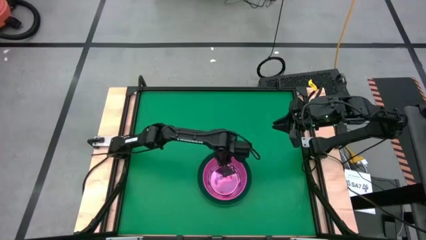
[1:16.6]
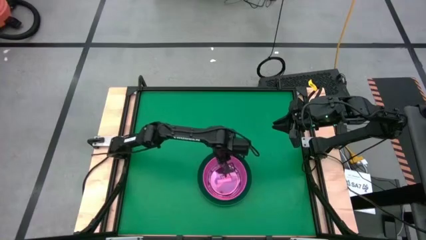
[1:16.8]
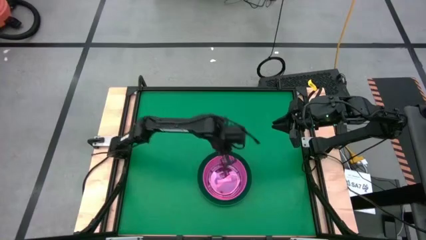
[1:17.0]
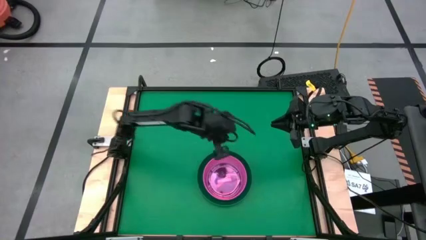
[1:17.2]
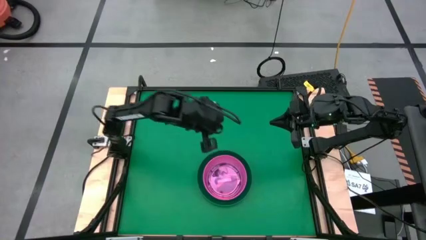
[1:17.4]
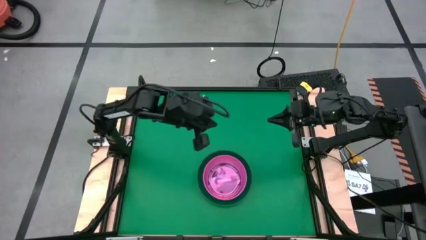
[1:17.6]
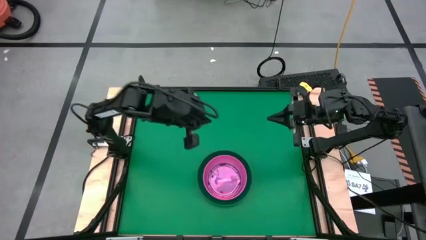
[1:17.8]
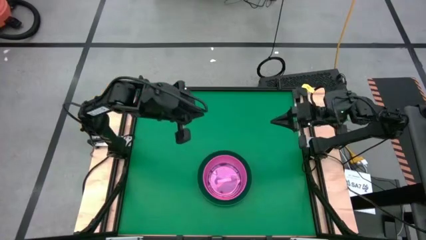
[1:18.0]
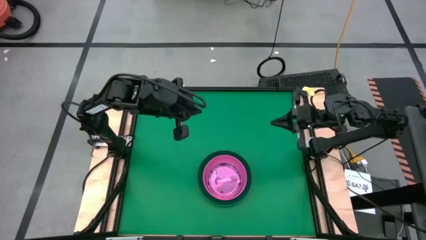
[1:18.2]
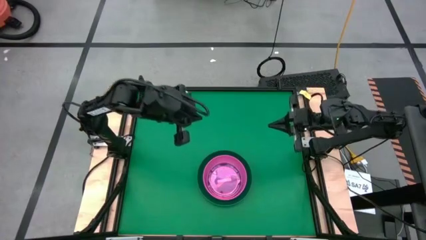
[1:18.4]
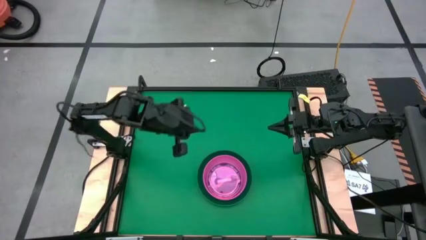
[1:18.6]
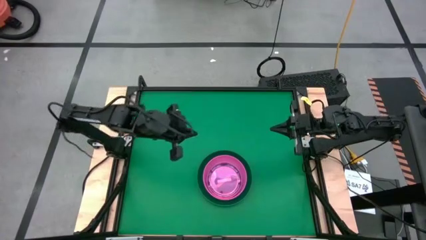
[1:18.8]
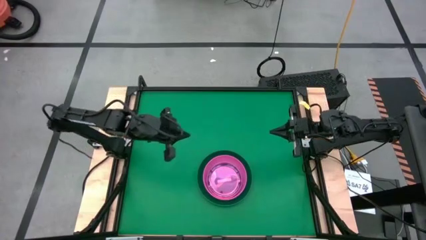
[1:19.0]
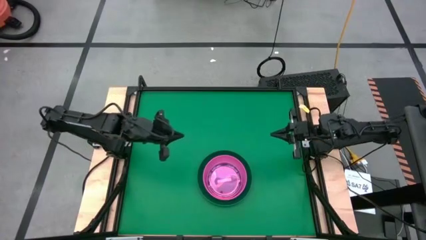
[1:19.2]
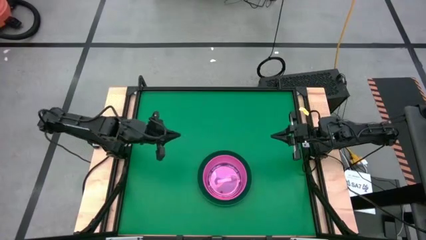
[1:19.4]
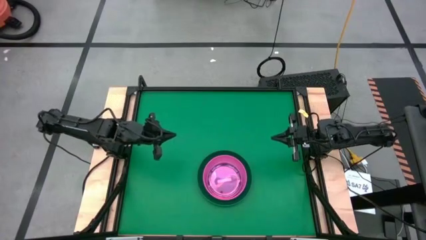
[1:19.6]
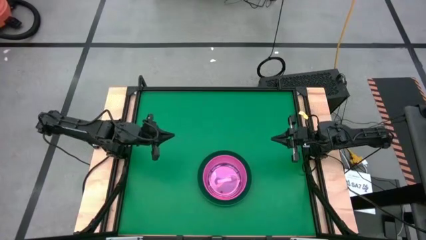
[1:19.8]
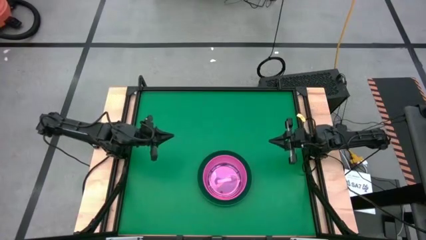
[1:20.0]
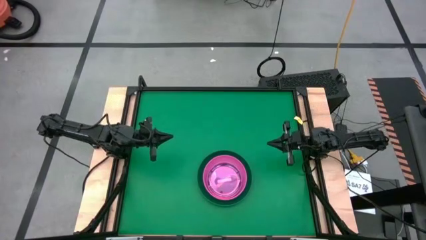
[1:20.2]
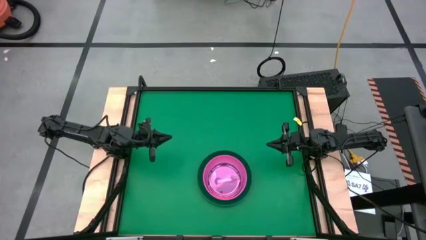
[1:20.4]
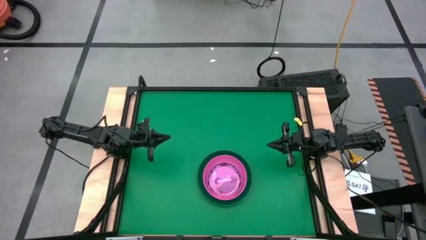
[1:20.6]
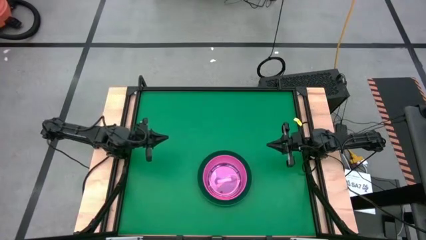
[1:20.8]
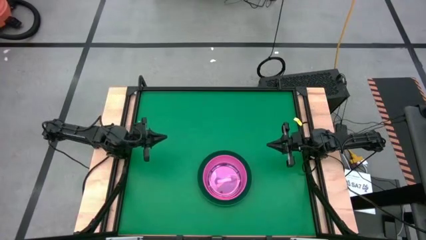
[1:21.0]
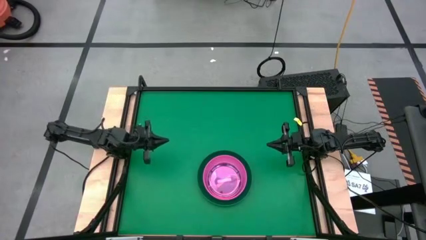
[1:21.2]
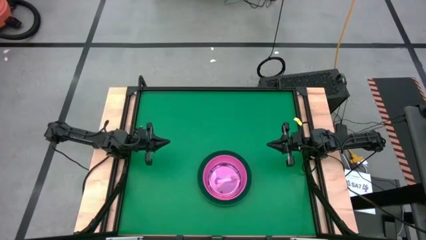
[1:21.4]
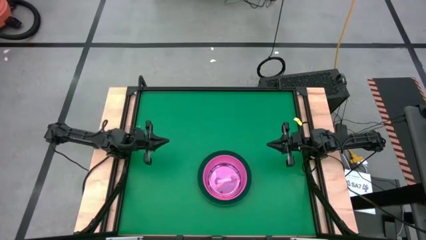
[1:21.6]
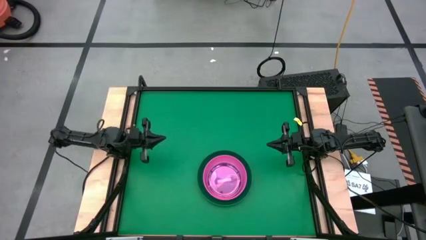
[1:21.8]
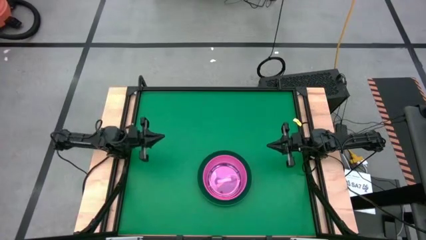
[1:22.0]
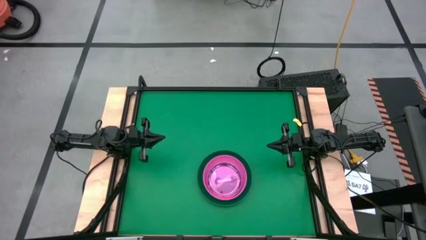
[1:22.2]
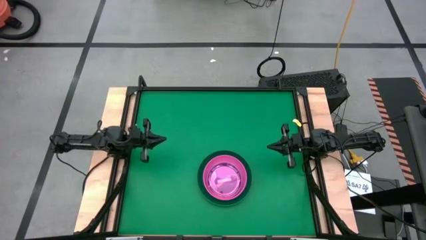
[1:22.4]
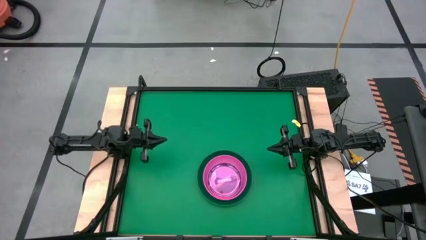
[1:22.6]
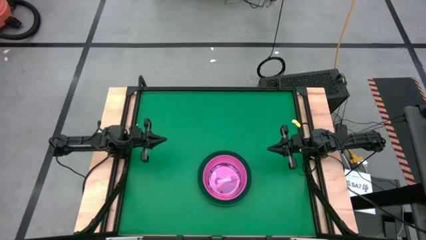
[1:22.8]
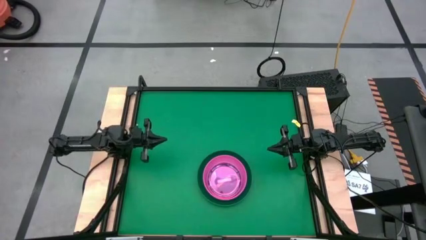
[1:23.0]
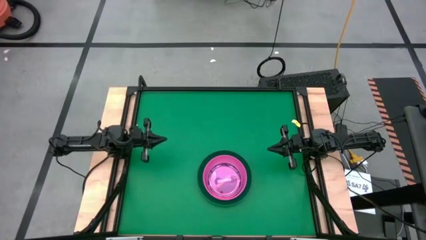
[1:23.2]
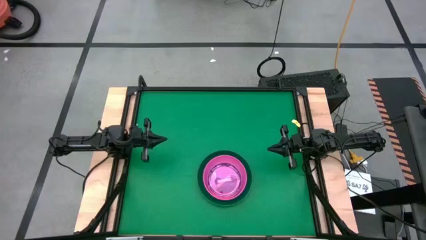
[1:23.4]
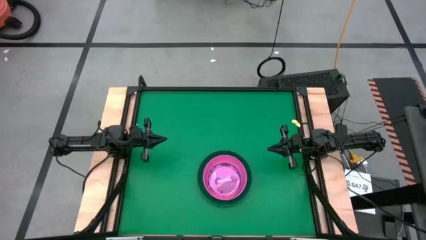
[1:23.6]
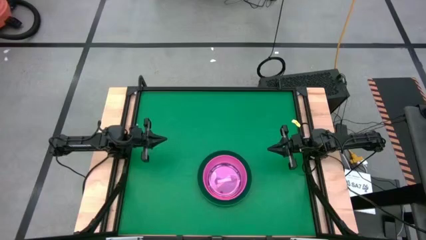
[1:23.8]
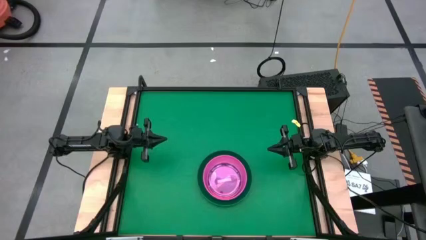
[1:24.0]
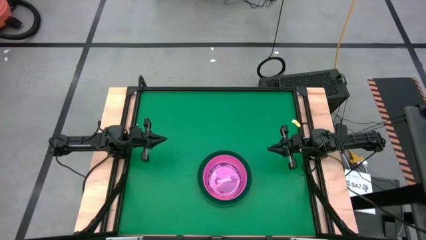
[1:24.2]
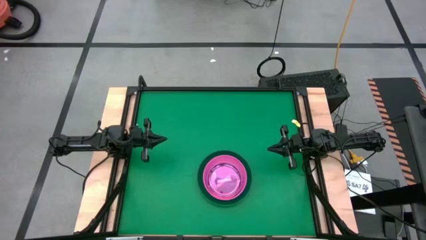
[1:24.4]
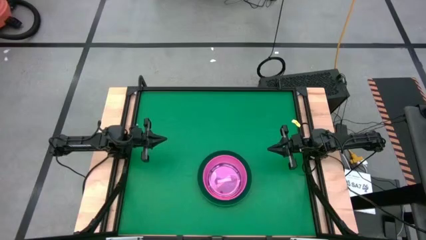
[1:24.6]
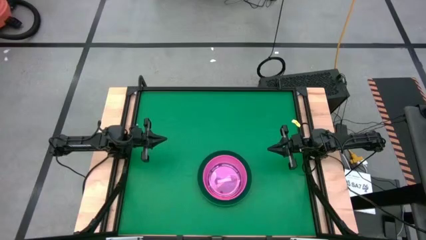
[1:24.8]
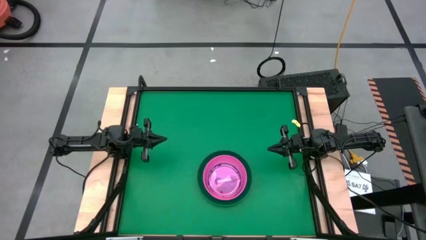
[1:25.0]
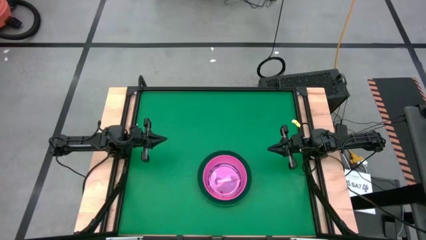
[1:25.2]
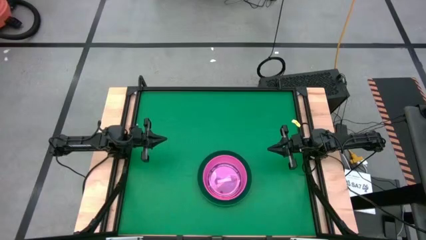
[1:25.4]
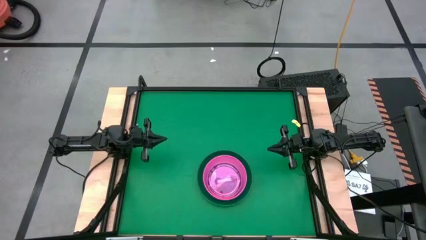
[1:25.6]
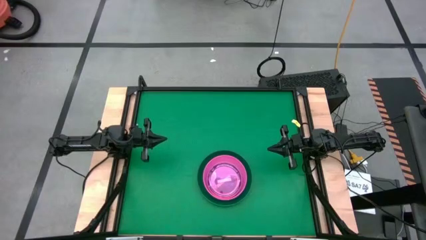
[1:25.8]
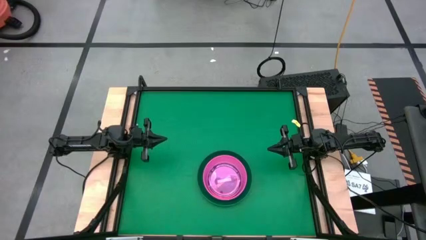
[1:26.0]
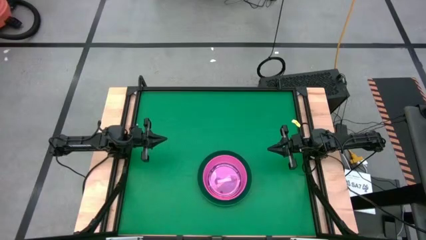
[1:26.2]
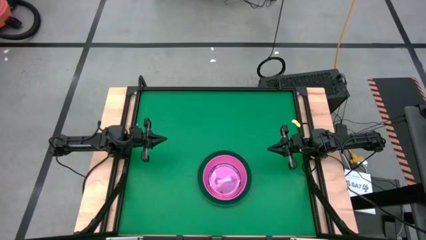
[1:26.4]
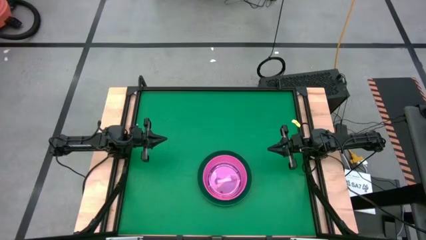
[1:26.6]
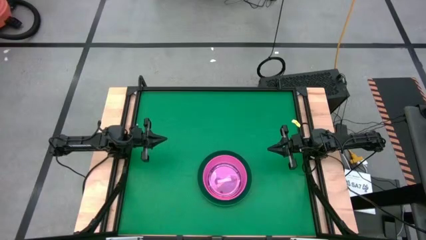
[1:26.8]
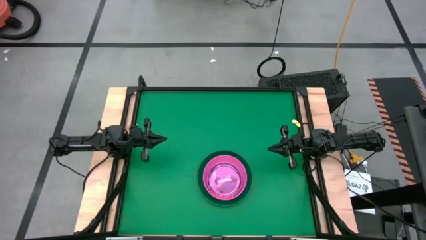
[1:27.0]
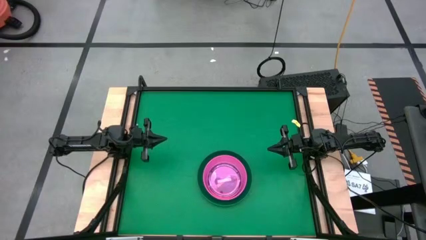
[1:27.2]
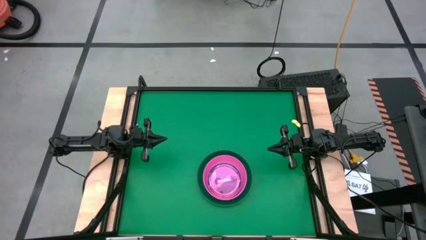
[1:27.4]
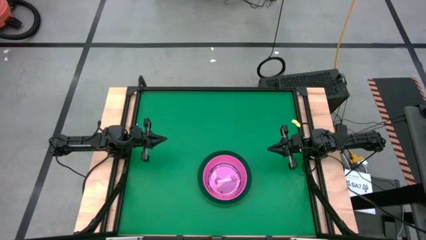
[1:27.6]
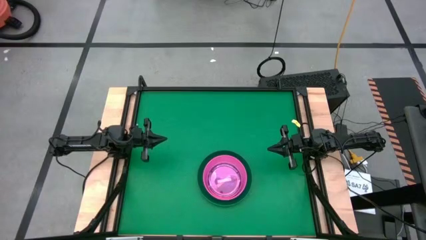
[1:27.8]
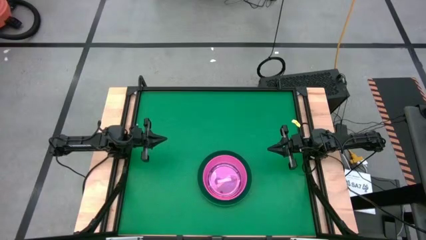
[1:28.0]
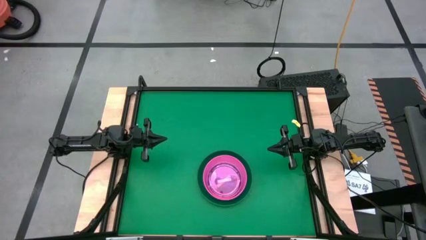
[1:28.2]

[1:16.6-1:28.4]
Task: Stack plastic plates
Return to Home Position

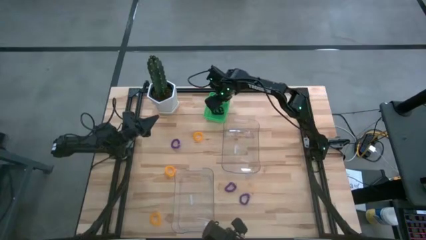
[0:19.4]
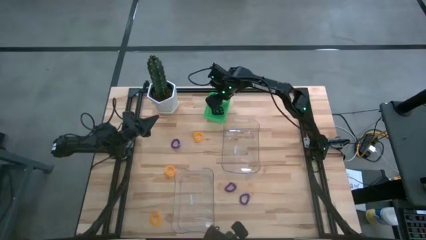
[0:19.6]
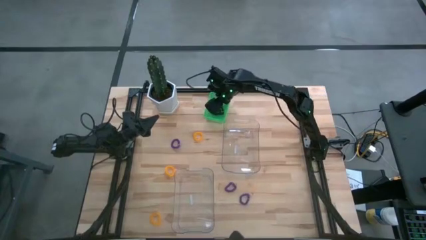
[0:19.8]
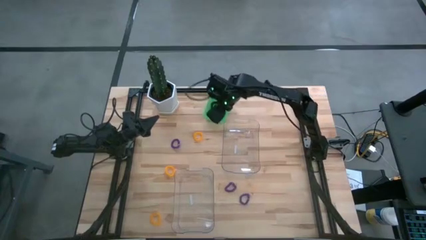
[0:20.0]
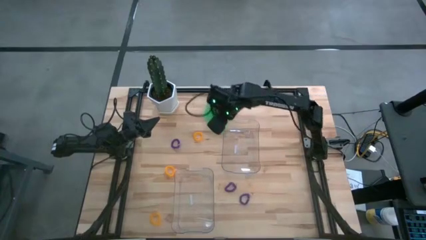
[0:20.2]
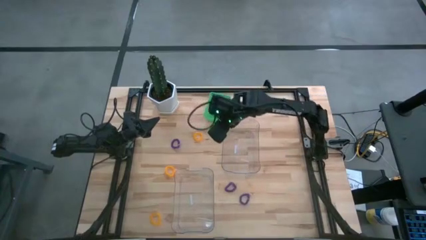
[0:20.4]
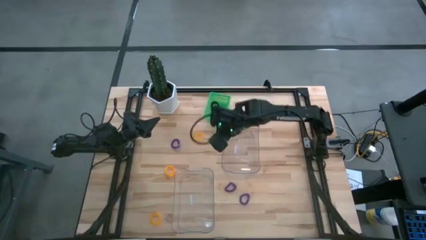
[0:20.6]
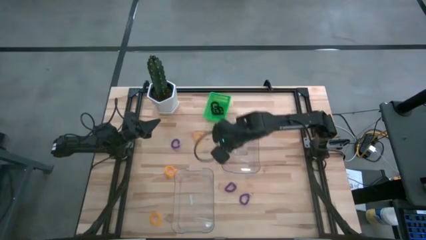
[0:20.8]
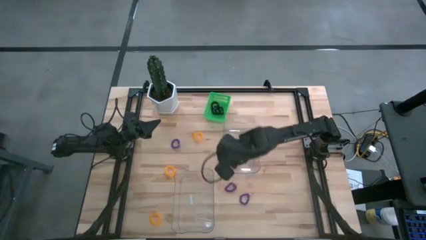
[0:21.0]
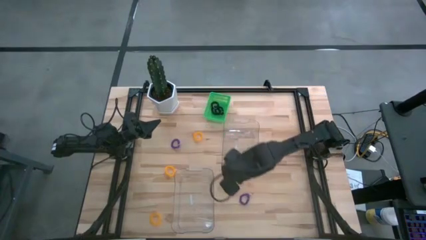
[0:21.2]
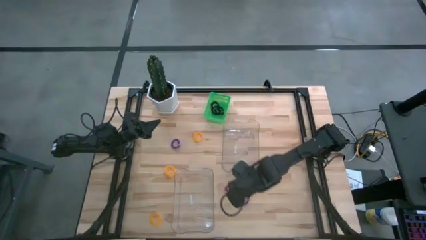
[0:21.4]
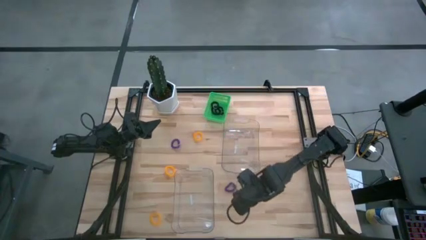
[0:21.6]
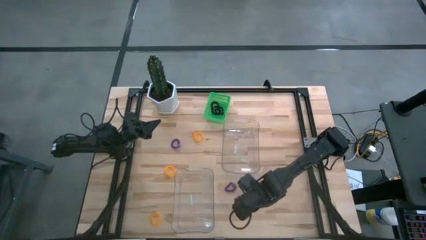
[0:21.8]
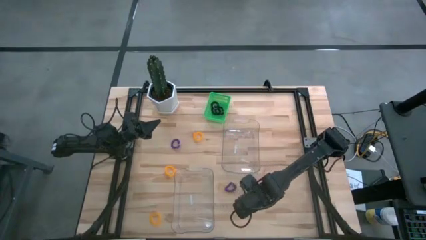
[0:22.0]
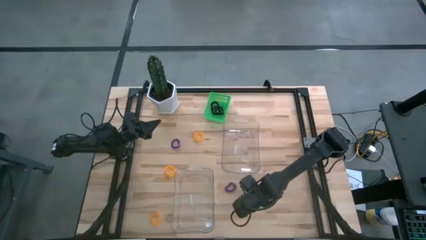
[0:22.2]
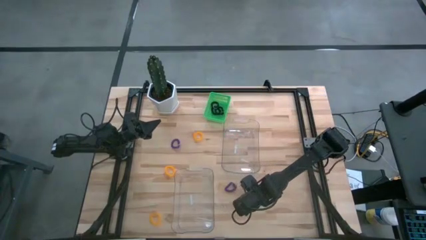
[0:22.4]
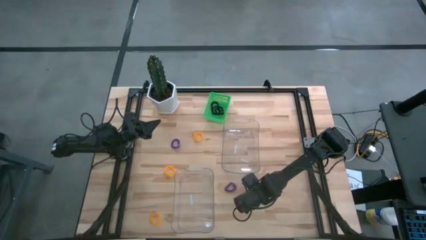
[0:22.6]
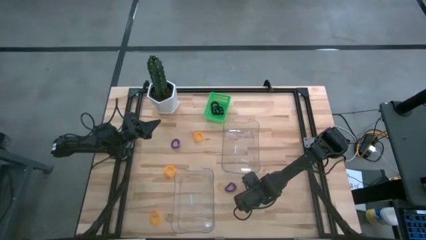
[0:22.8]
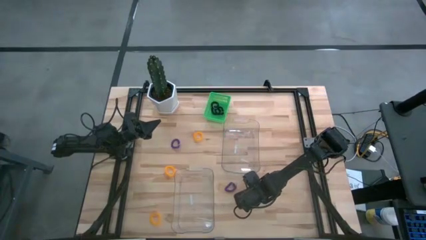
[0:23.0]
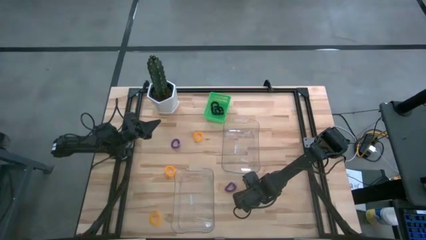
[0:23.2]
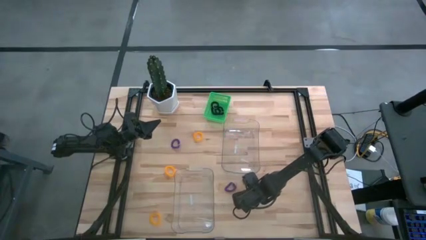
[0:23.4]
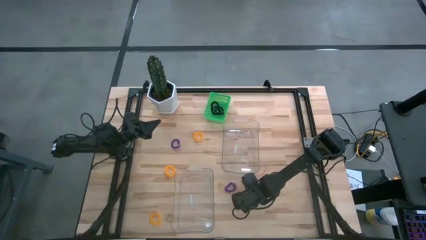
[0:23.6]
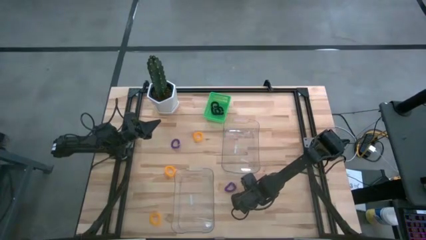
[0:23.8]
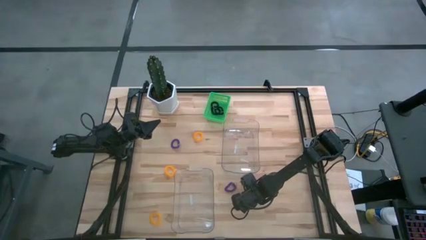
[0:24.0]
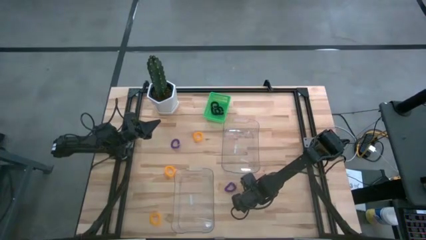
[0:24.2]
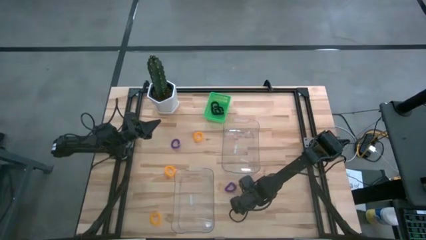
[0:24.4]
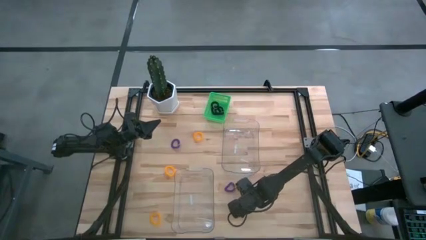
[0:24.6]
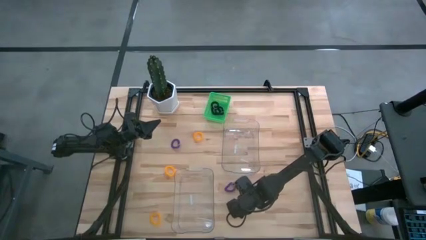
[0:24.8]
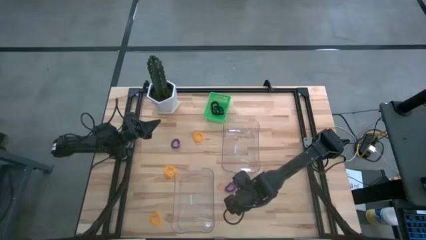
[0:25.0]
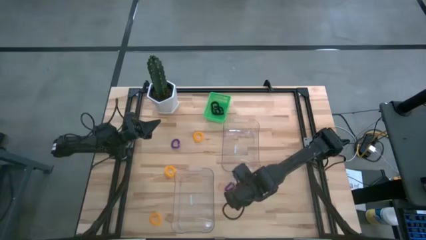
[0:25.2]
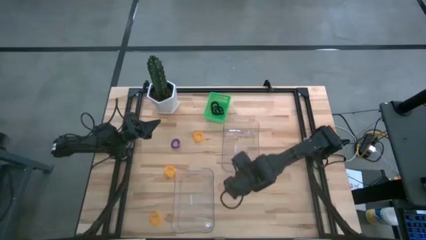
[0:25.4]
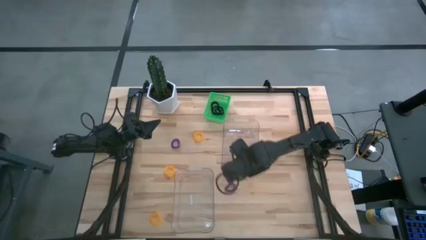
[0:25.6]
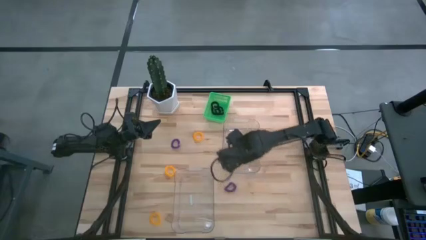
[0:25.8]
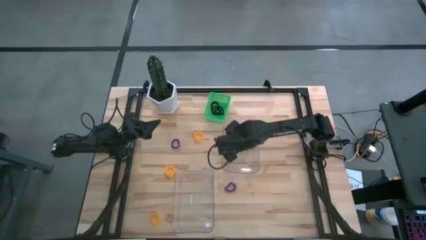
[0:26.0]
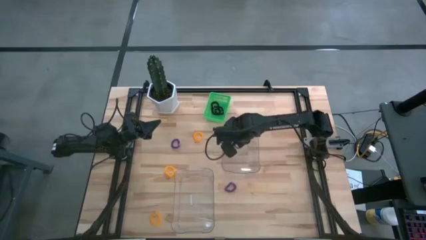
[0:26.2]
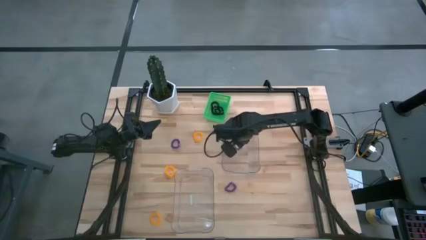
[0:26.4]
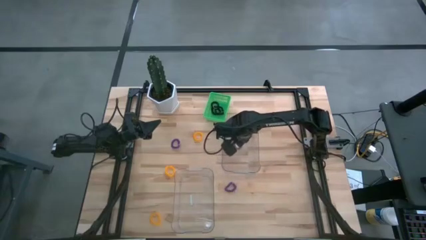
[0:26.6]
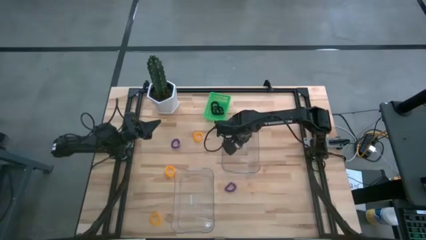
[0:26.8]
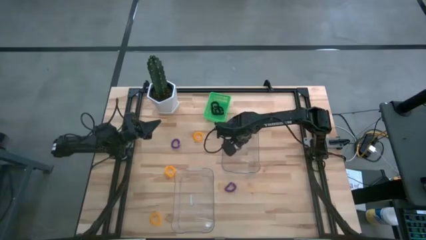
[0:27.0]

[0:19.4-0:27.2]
Task: Sort spring keychains
Put the bottom violet spring keychain into the top transparent bin
